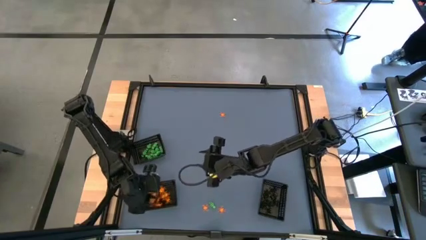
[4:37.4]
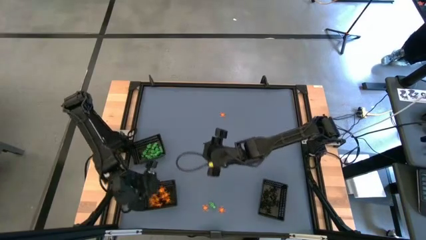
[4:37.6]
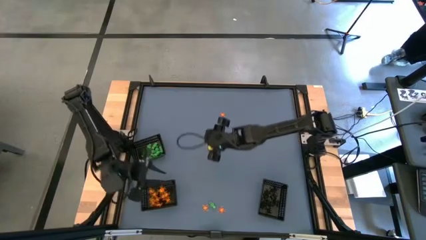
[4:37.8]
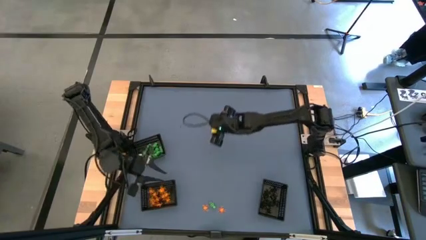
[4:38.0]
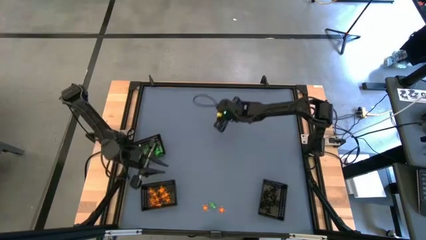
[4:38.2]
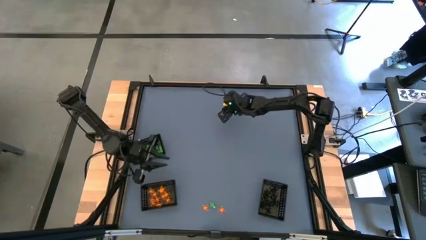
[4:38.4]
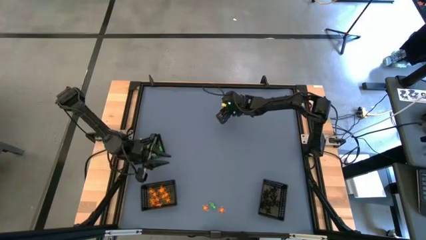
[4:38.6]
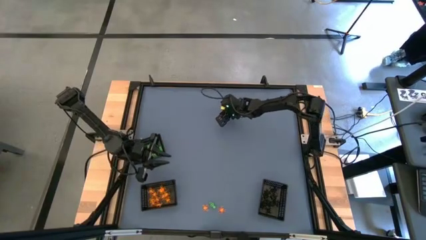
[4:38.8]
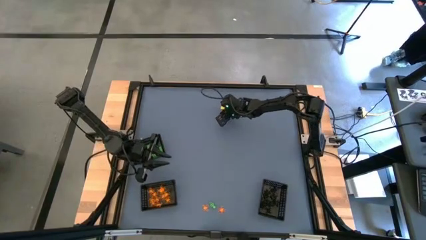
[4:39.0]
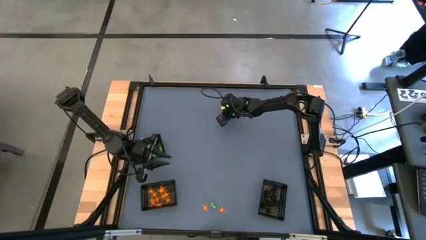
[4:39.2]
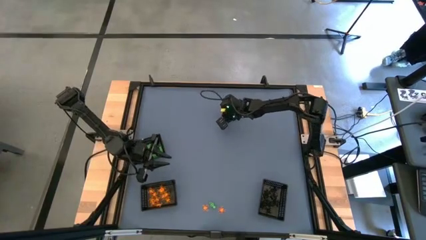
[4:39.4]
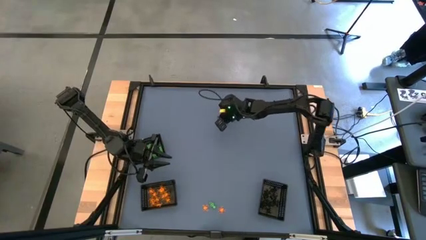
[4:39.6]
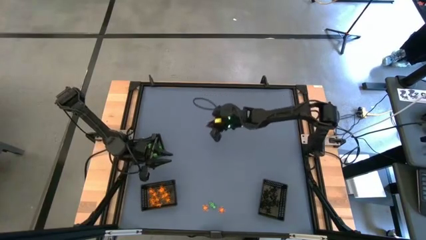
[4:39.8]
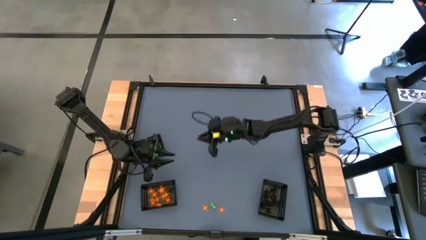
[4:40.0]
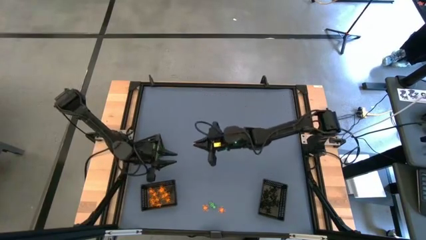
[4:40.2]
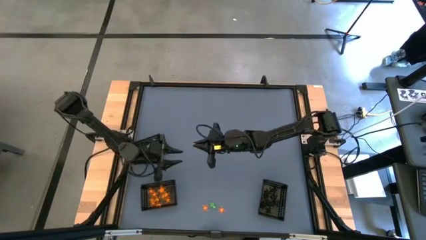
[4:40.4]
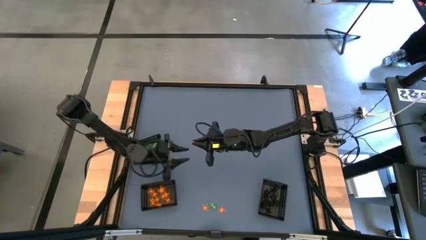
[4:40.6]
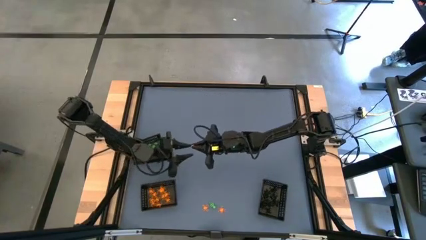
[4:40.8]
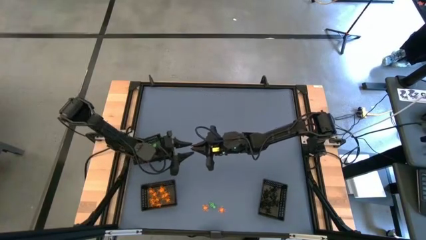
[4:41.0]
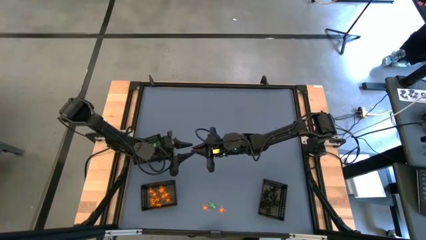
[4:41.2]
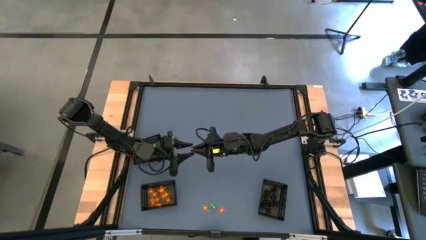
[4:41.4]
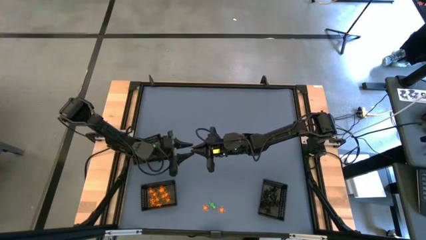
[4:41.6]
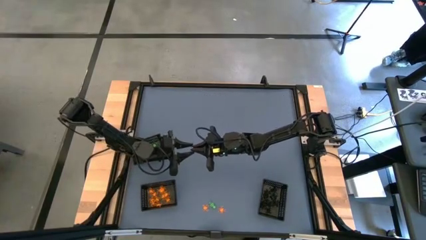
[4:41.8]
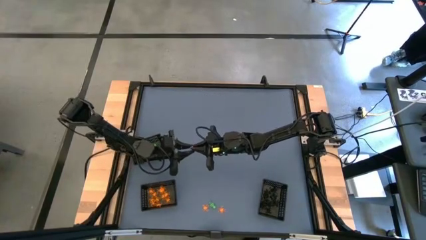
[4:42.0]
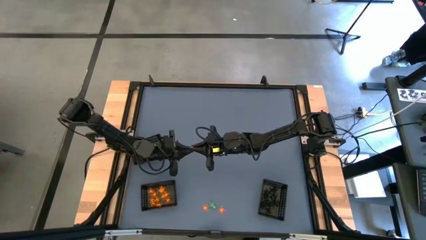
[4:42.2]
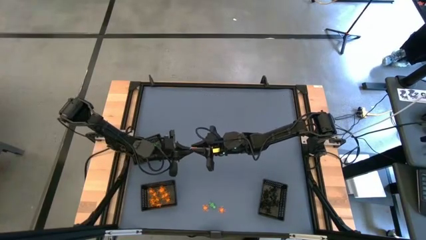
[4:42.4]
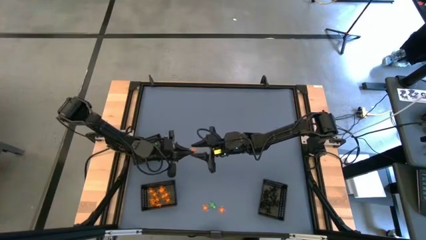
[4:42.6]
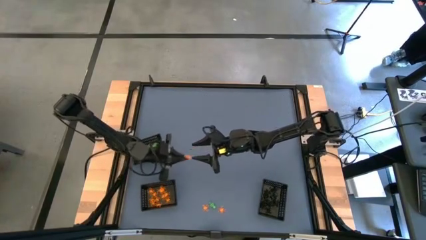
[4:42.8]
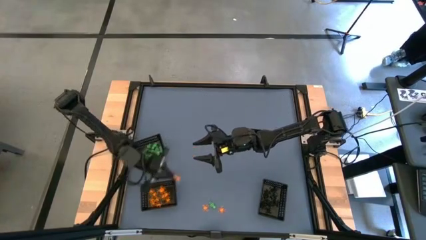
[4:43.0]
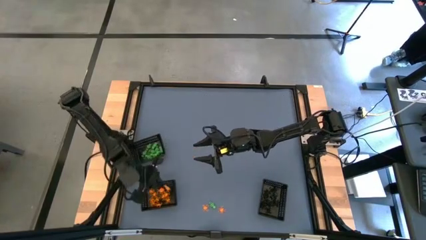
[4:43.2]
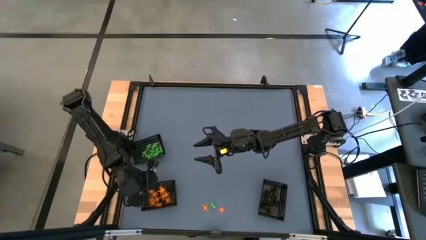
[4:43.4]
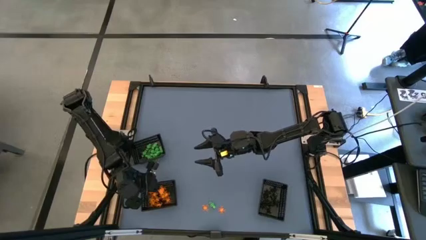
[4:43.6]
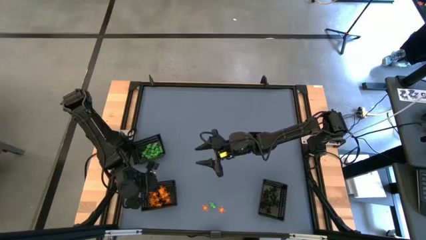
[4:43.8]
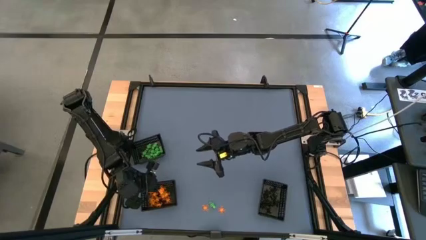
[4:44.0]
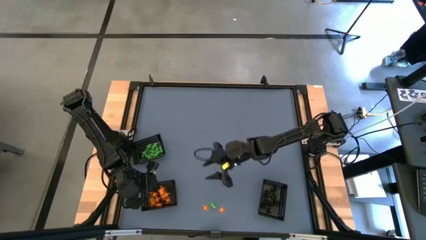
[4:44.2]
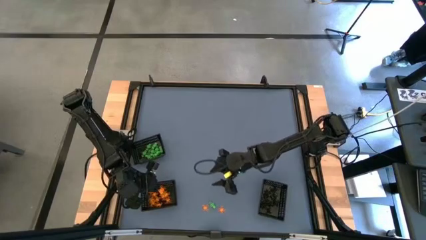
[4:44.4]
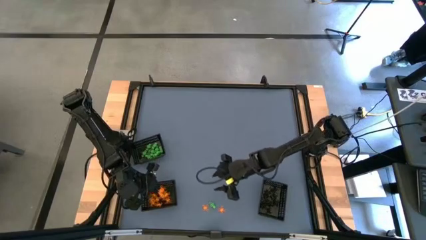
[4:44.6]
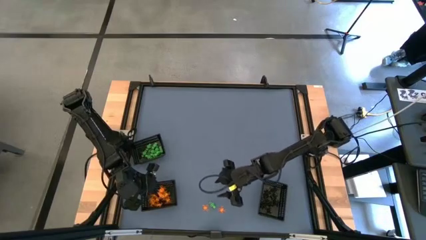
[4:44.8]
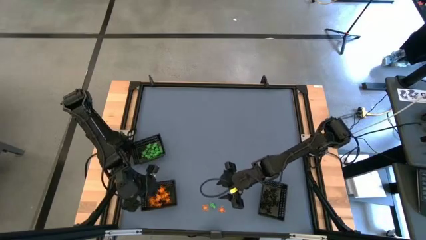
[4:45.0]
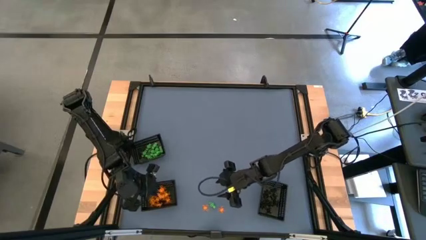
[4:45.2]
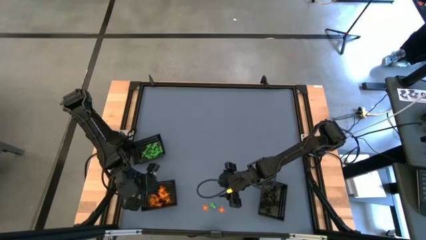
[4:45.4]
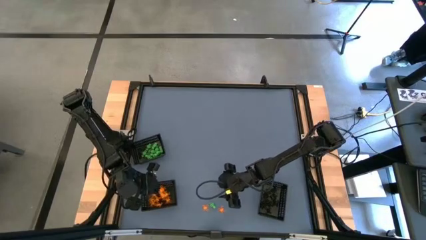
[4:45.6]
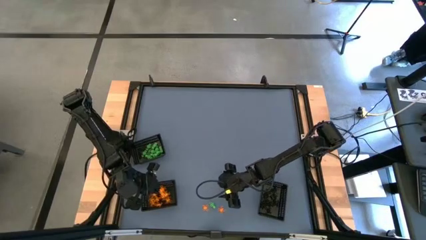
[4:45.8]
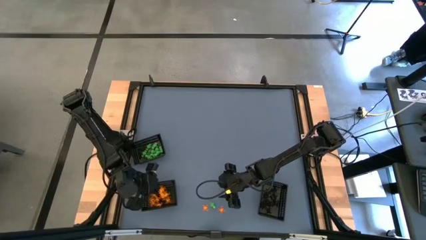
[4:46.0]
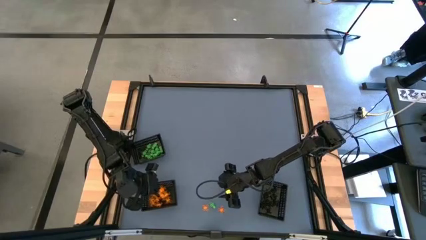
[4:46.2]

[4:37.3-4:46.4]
Task: Sort Halloween decoration
Put the orange spider toy into the bottom left black bin

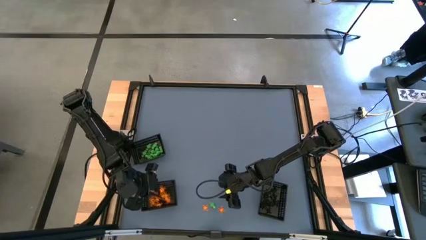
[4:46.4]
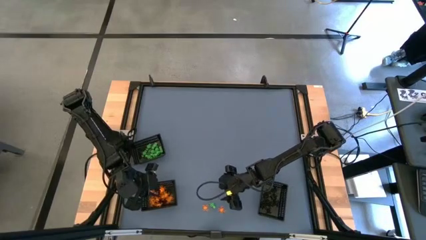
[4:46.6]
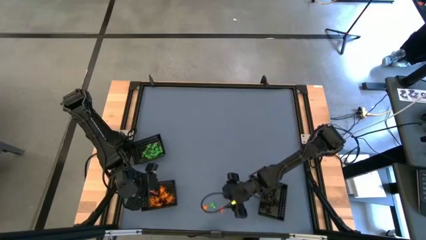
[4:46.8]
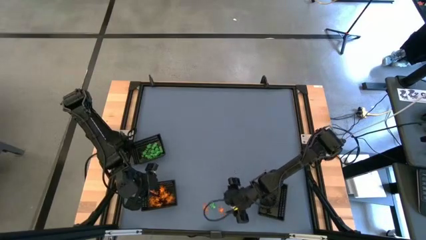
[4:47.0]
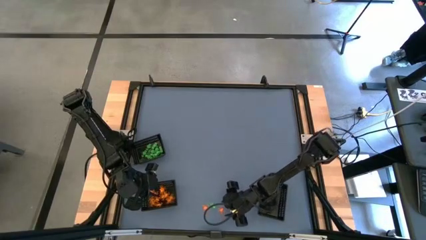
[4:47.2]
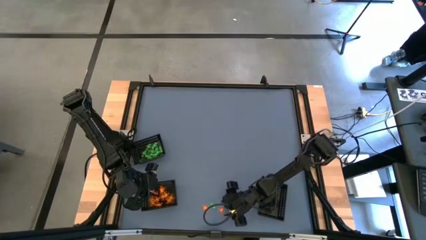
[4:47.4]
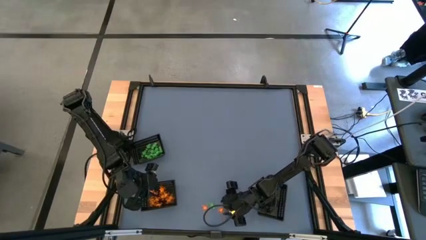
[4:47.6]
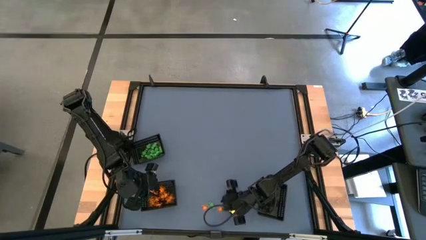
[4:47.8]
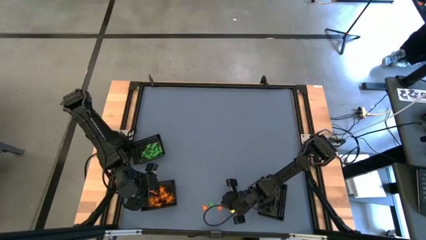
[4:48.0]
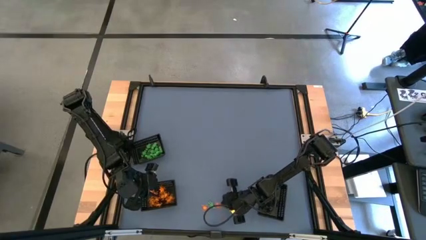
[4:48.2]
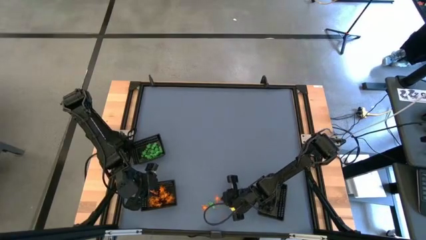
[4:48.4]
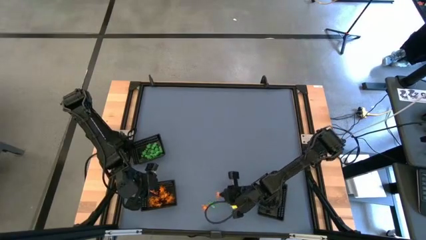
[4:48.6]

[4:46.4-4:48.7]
Put the orange spider toy into the bottom left black bin

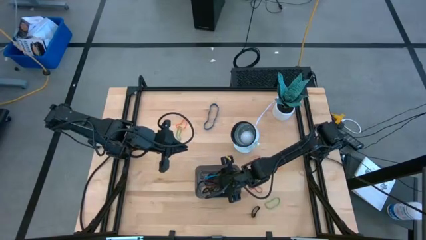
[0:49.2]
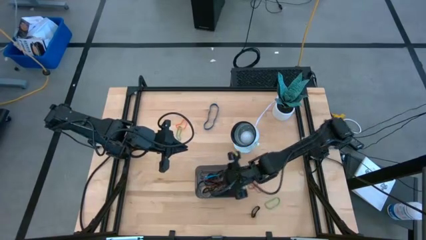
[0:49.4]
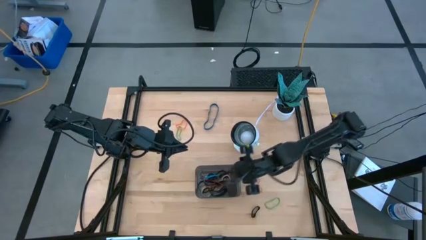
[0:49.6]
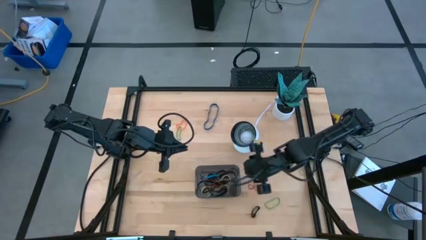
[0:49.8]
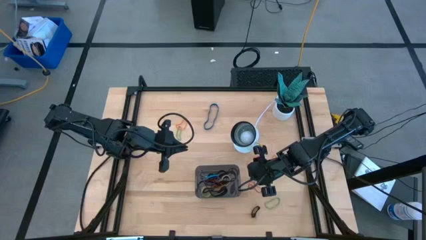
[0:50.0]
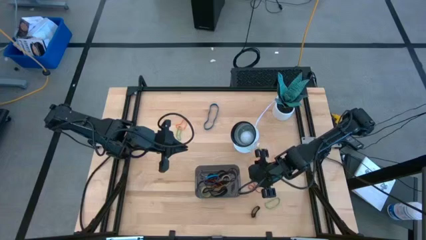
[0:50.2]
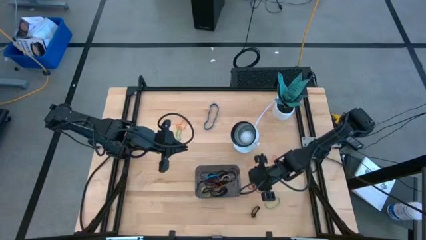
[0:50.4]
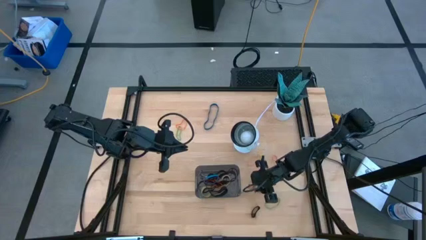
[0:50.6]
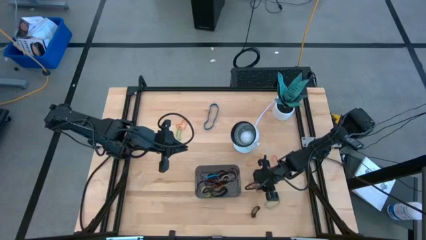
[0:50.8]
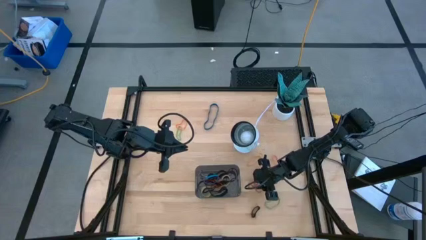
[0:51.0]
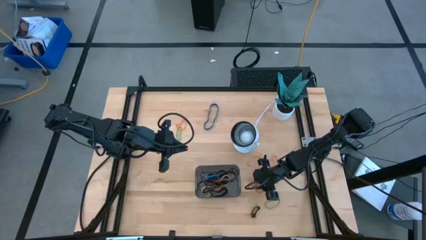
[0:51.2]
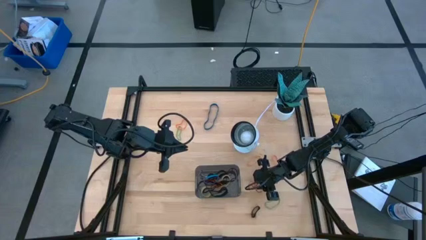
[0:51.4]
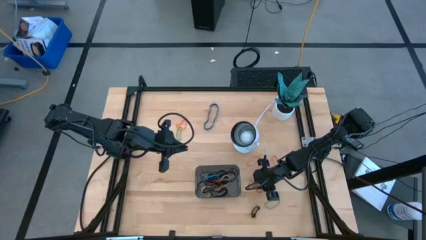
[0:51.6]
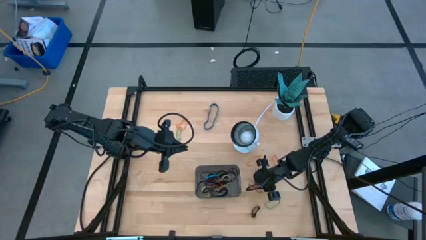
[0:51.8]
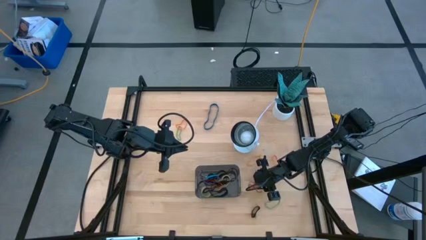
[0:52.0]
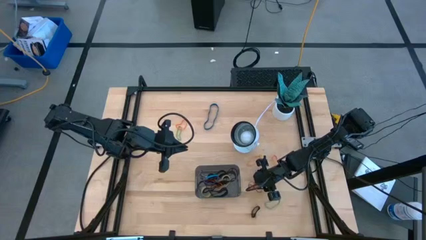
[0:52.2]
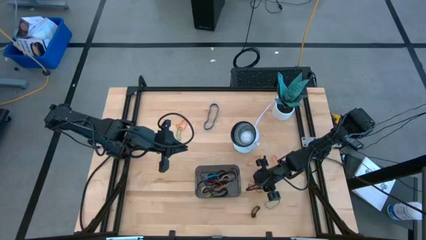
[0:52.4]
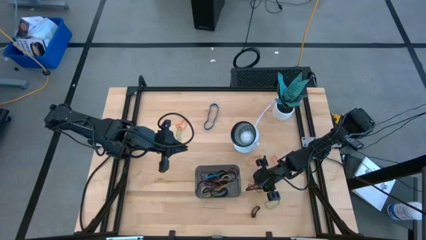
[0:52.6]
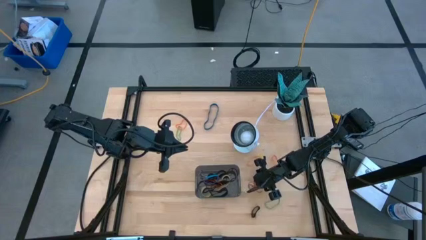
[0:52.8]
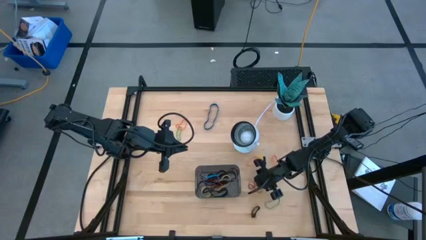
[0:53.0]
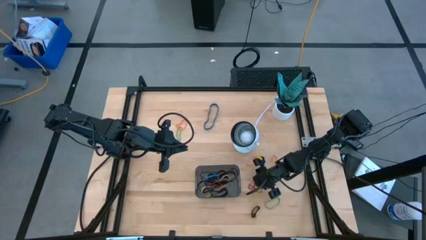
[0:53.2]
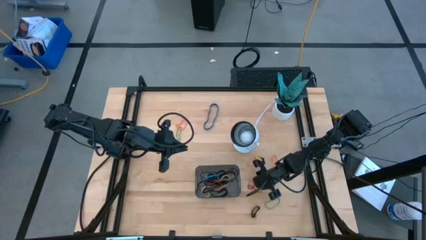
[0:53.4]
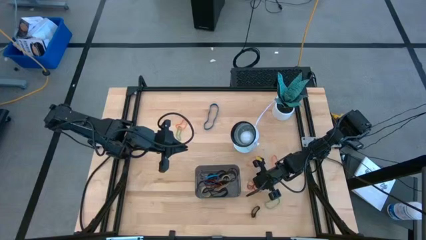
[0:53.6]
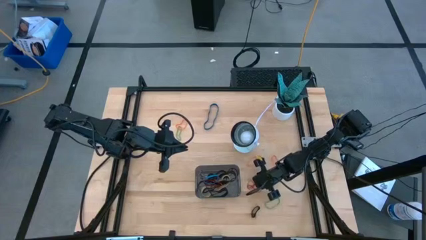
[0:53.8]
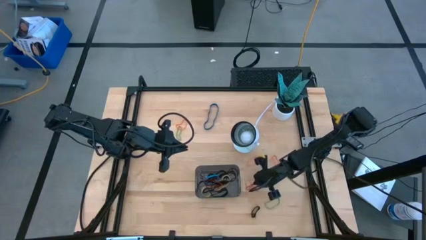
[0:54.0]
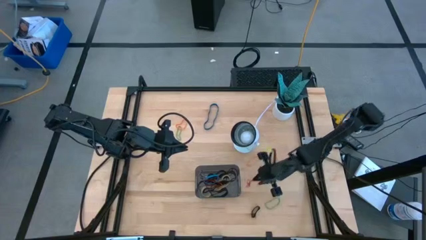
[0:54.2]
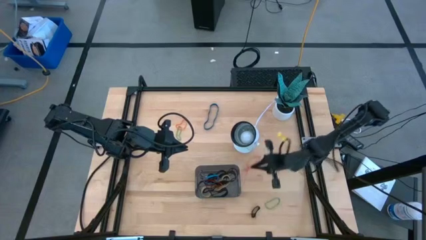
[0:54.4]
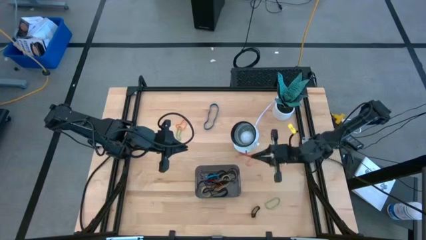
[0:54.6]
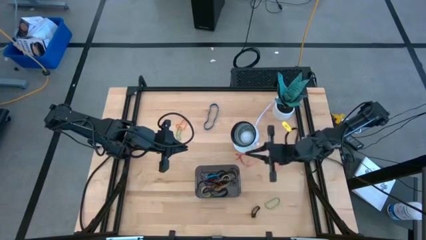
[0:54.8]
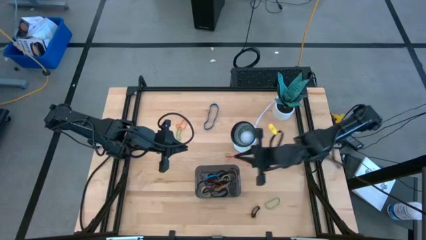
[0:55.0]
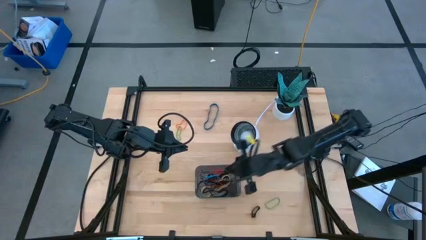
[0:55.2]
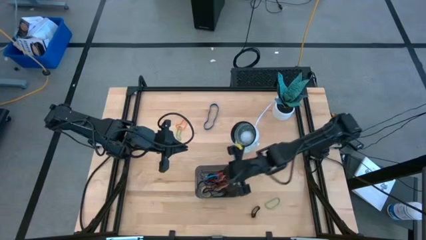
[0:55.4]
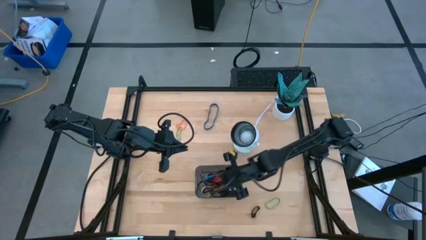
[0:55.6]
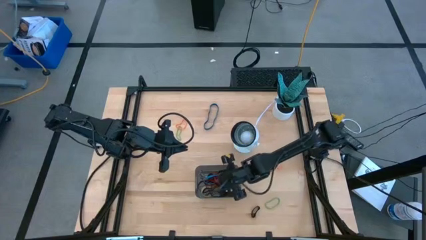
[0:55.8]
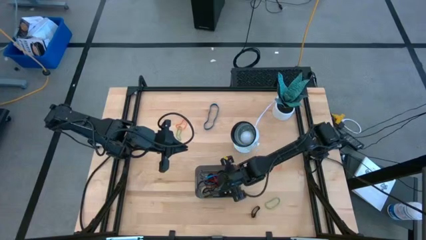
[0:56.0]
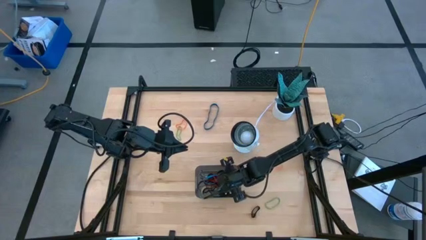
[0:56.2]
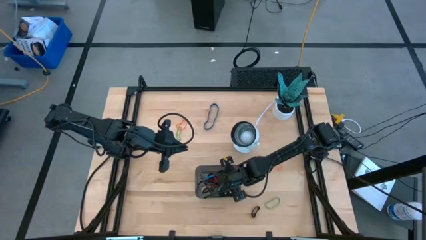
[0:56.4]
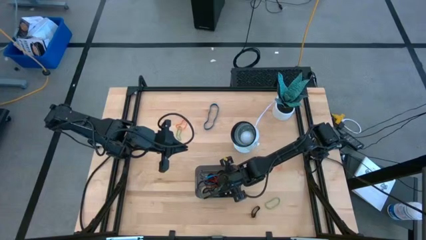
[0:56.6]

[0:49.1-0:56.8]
Task: Pick and place rubber bands into bin
Put the red rubber band into the black bin
